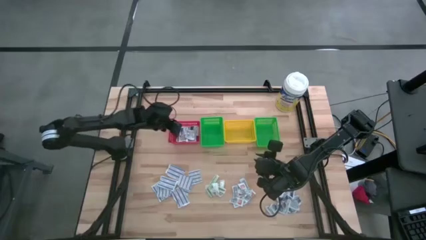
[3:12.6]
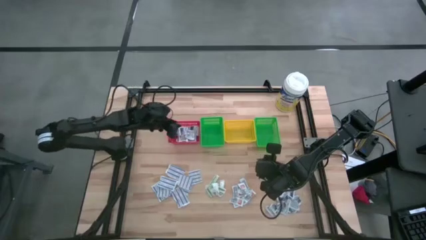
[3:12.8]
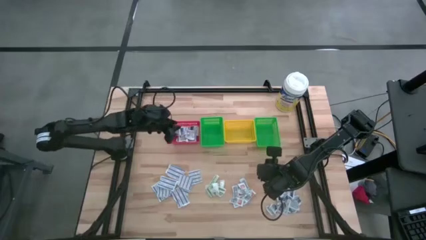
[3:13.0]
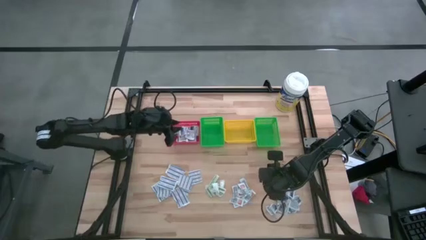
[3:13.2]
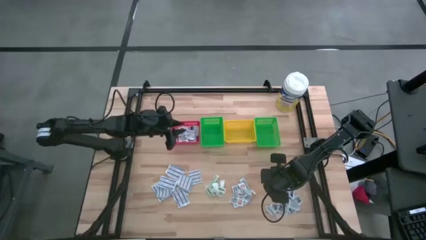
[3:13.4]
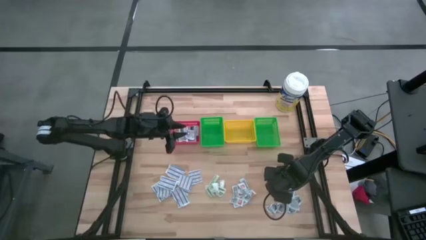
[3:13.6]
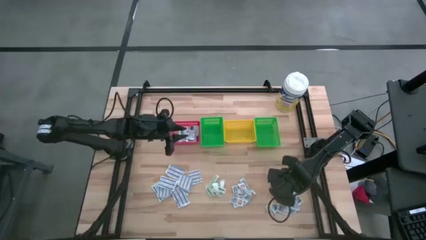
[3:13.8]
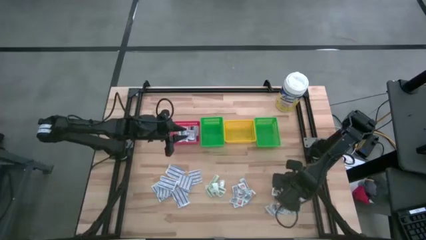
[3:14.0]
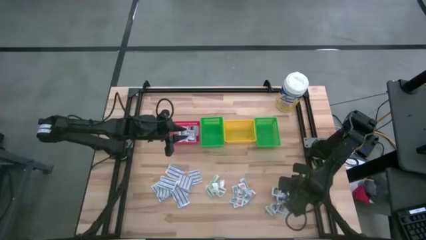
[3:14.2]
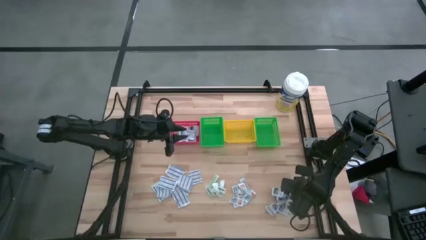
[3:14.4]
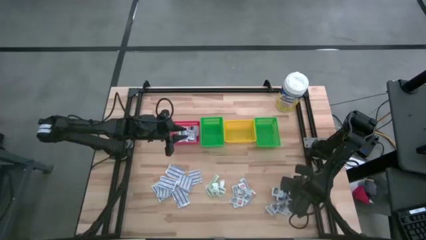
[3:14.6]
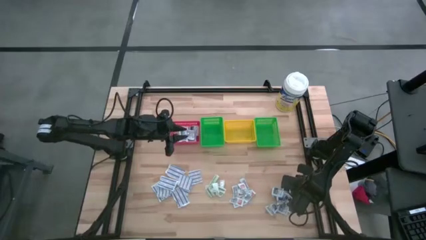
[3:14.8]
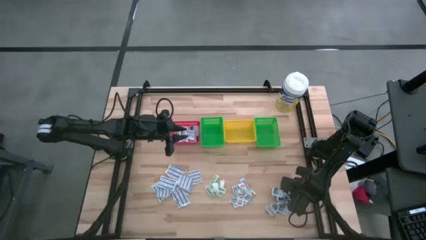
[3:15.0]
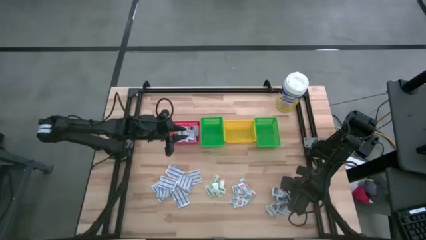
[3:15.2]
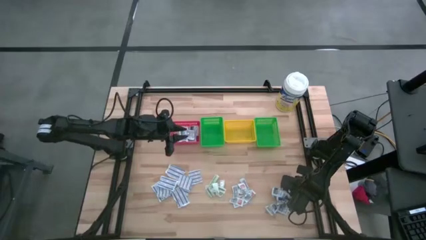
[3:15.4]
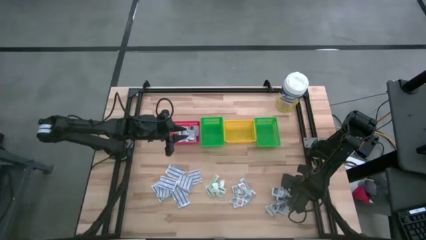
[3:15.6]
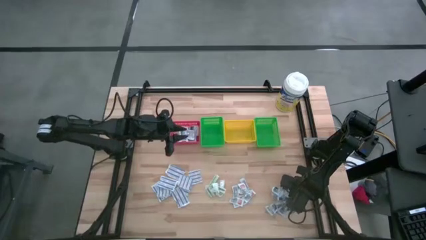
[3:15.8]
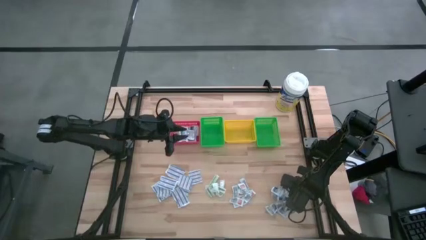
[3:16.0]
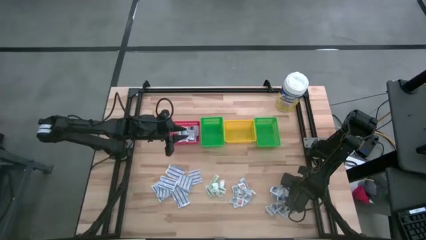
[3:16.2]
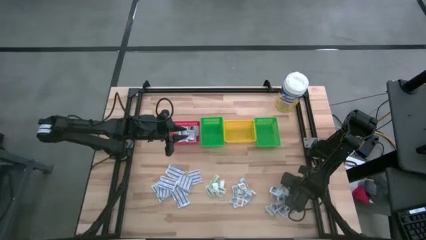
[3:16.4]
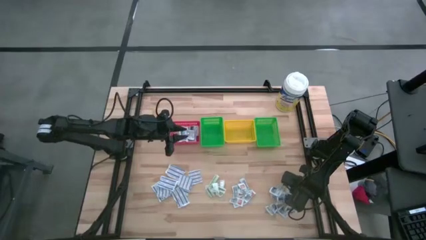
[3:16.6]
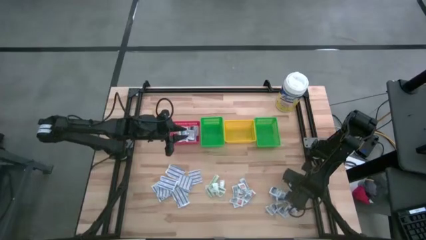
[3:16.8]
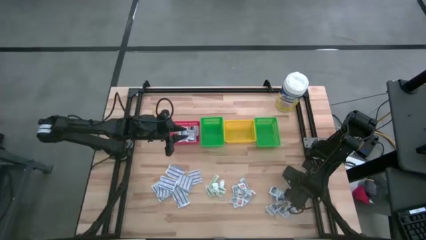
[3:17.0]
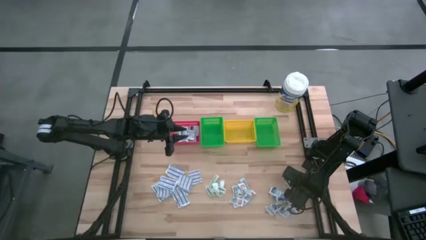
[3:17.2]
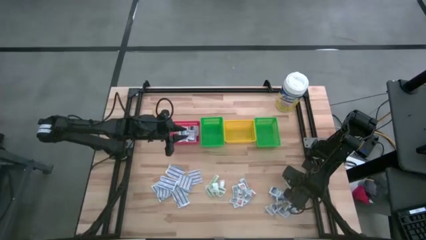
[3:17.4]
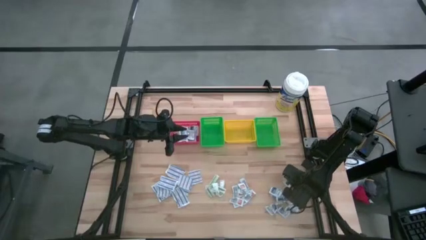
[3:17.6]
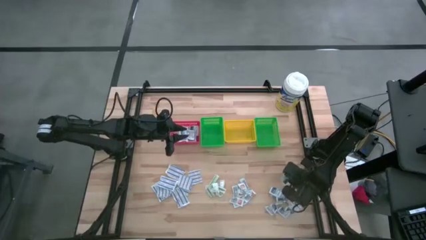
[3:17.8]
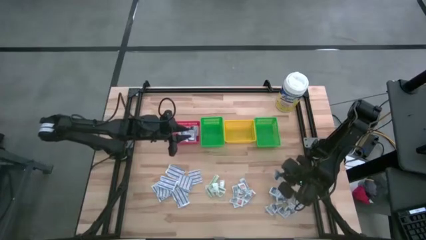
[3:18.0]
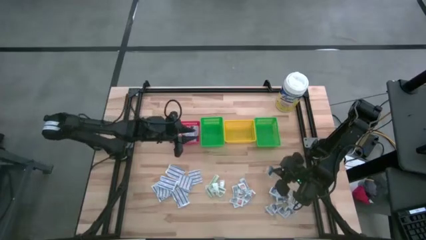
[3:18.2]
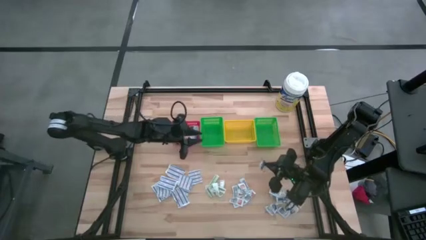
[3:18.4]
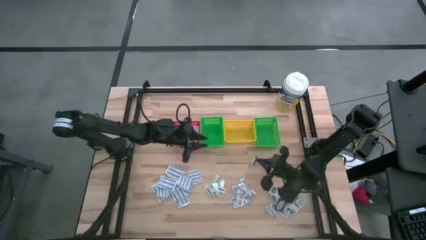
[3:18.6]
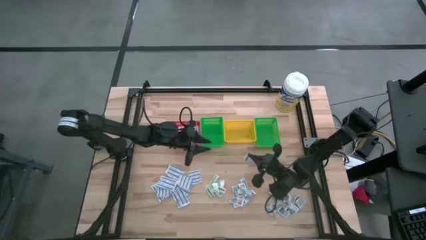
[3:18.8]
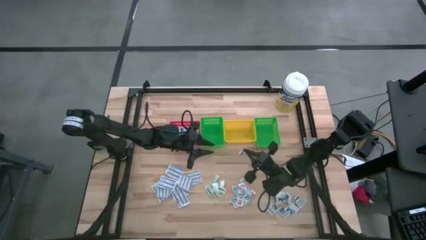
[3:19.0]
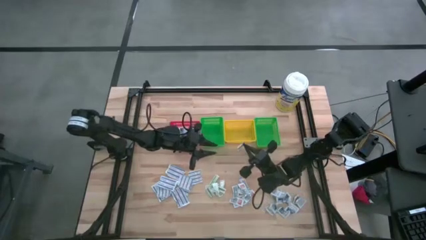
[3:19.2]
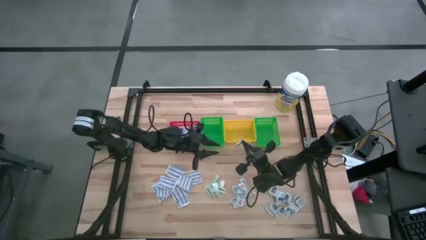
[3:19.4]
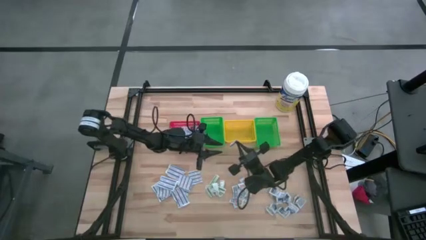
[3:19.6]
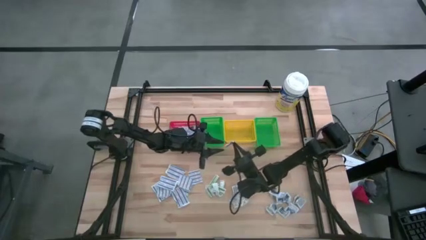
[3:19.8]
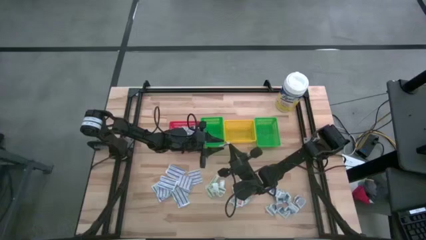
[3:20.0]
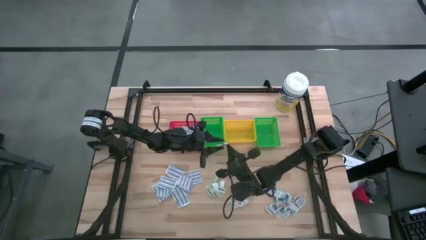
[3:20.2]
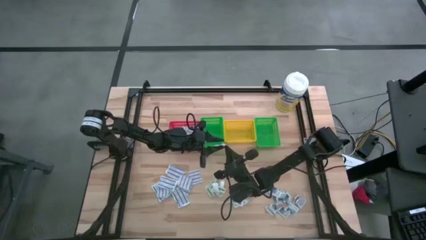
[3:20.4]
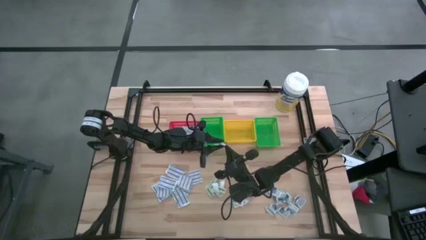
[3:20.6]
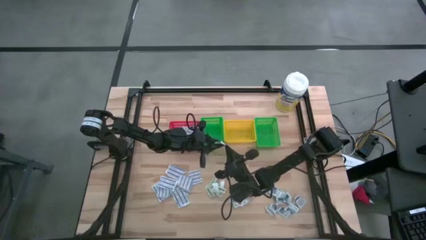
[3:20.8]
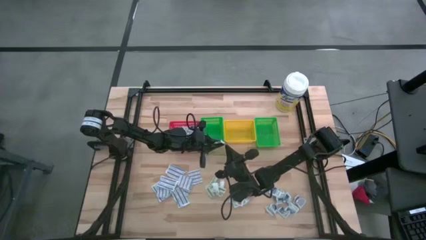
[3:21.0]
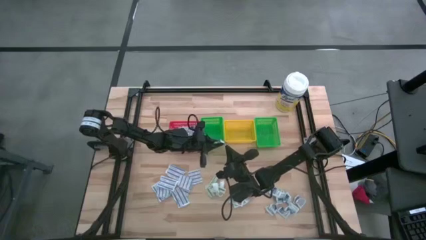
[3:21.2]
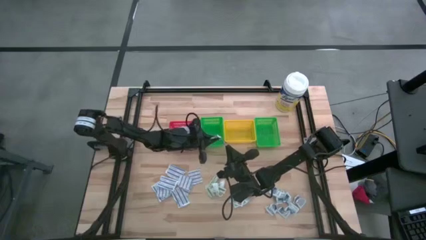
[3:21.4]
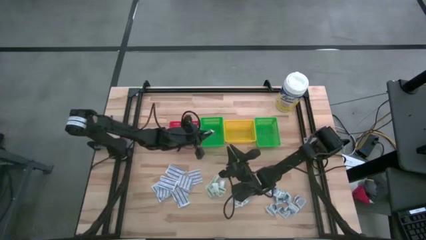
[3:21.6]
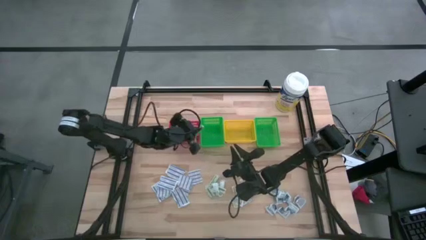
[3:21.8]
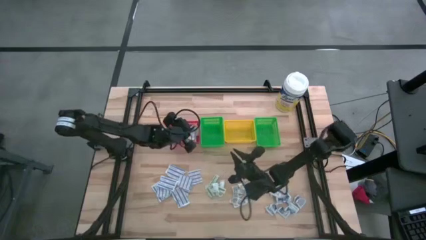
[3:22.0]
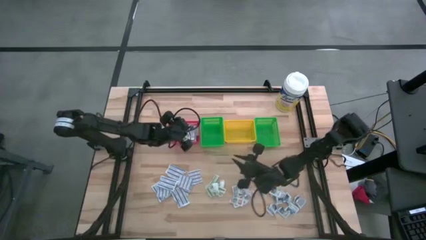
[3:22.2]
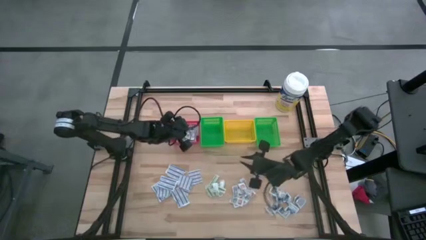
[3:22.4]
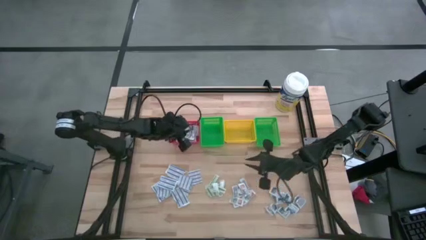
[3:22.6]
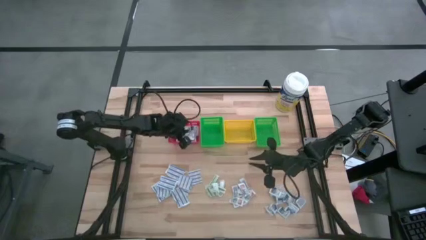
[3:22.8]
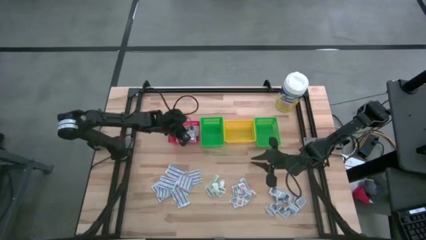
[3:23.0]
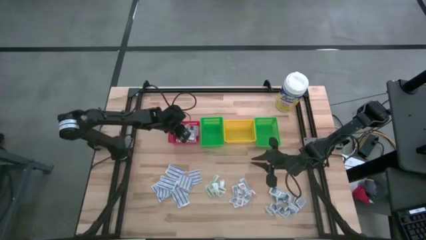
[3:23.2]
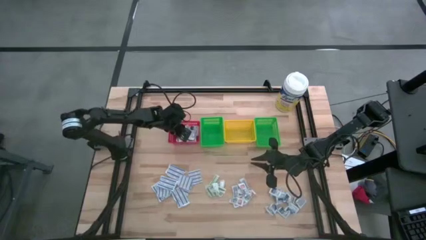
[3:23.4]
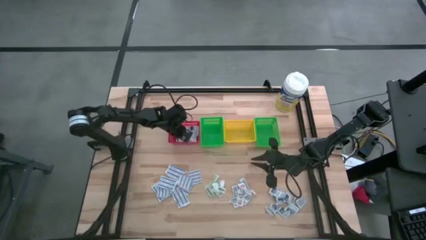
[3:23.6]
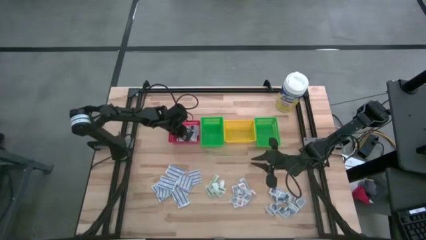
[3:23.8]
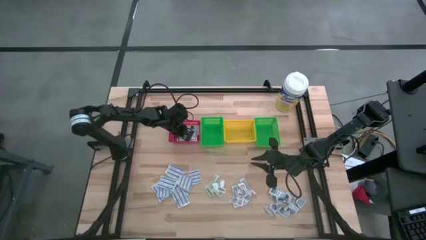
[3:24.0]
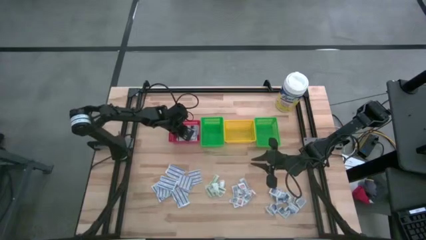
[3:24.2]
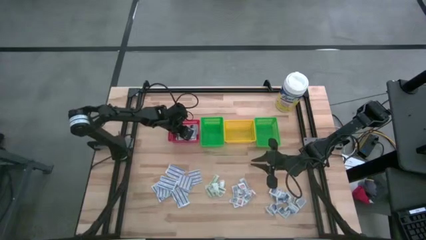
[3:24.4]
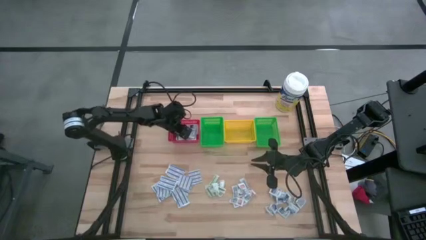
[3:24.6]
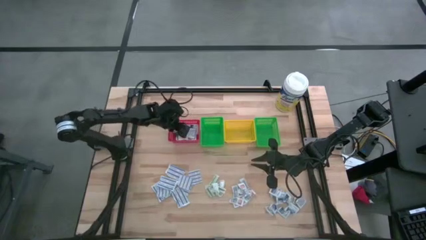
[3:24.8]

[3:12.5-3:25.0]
Task: Pick & Place First Aid Supplies
Put the alcohol pad into the red basket
